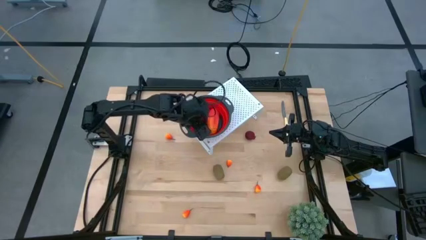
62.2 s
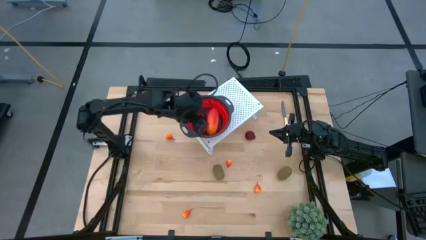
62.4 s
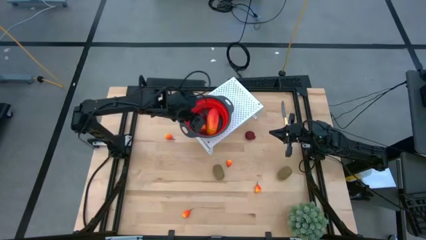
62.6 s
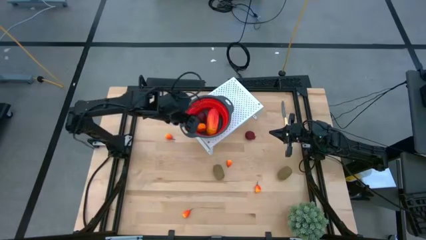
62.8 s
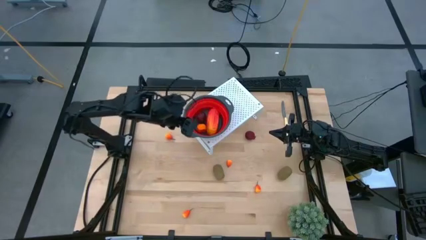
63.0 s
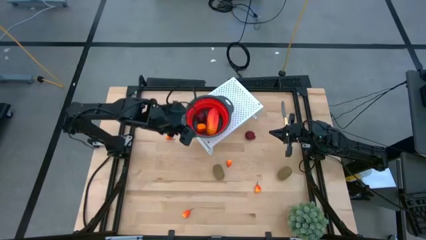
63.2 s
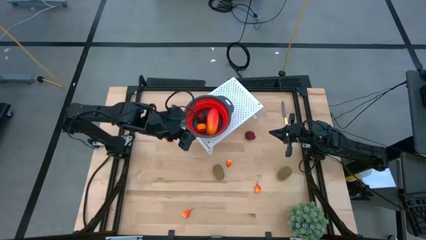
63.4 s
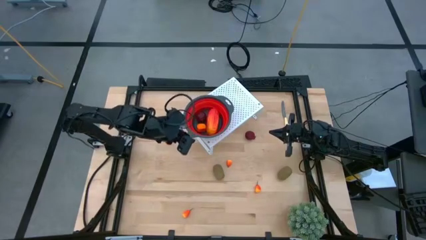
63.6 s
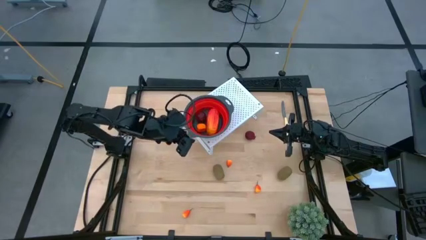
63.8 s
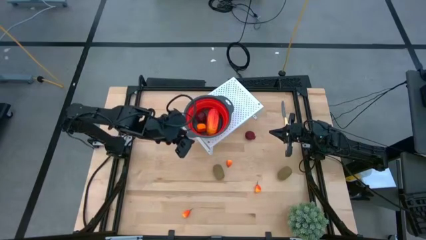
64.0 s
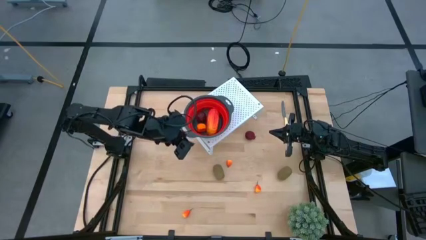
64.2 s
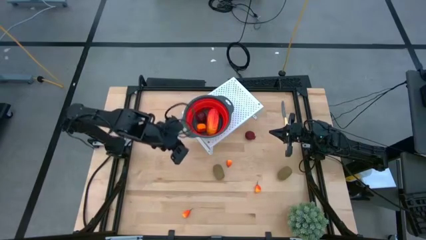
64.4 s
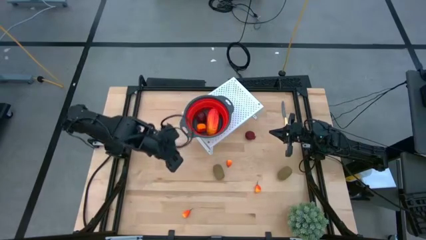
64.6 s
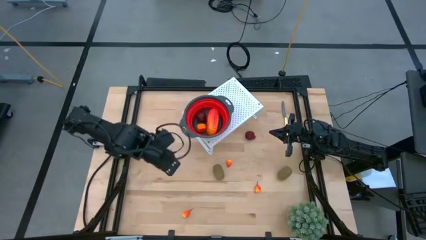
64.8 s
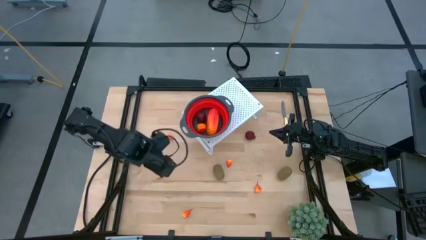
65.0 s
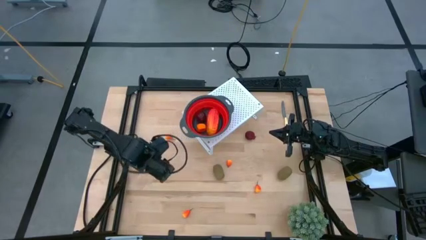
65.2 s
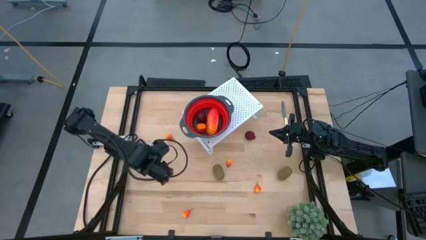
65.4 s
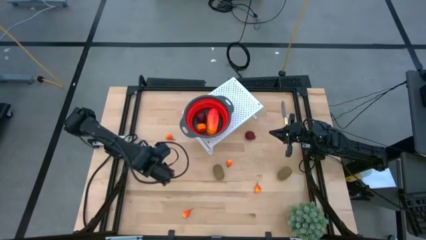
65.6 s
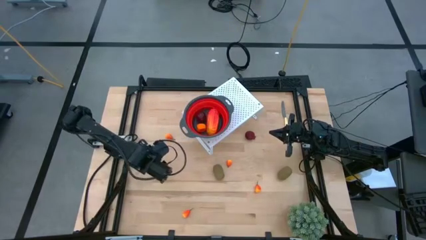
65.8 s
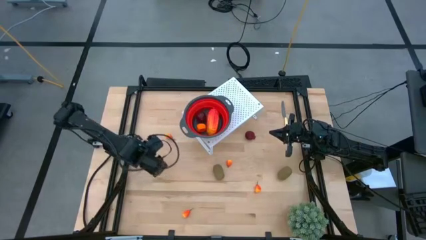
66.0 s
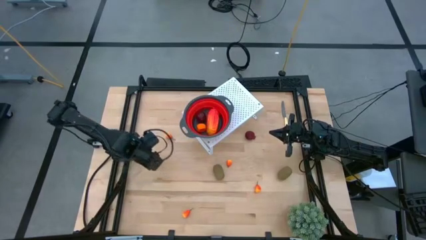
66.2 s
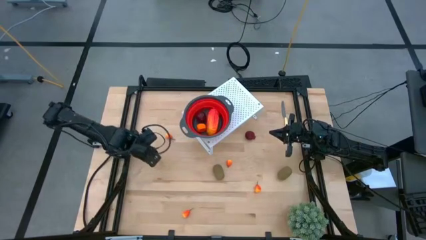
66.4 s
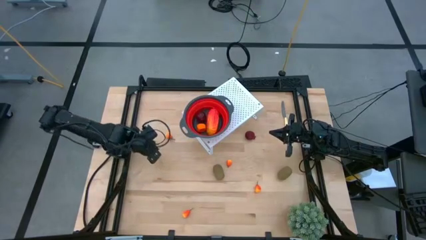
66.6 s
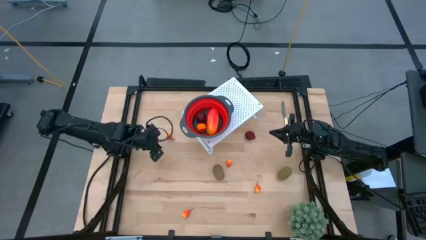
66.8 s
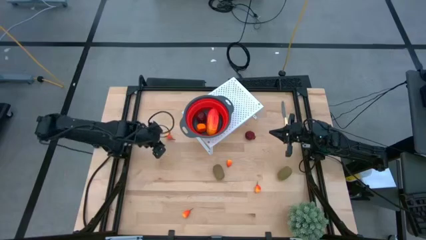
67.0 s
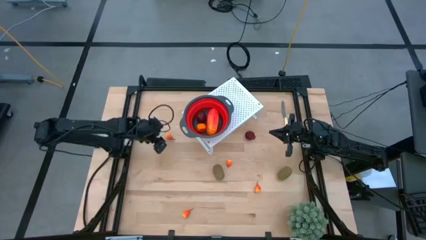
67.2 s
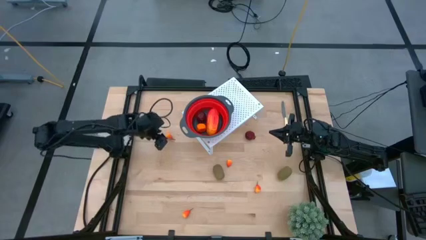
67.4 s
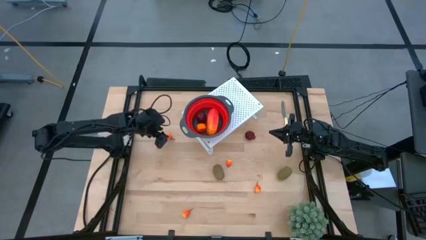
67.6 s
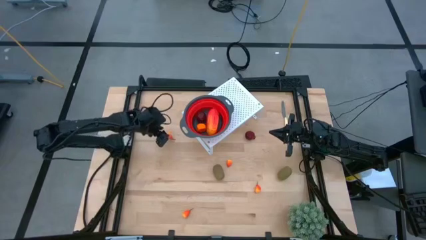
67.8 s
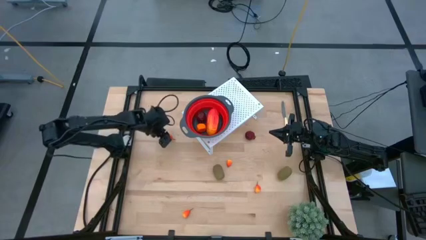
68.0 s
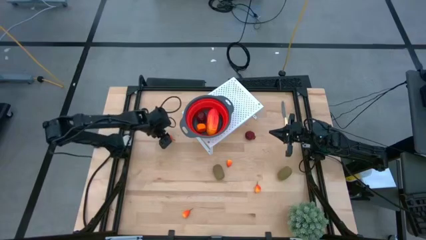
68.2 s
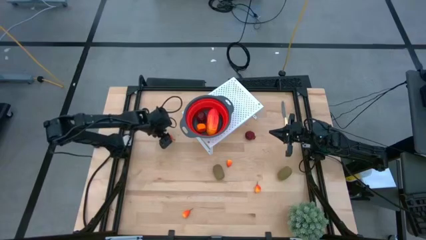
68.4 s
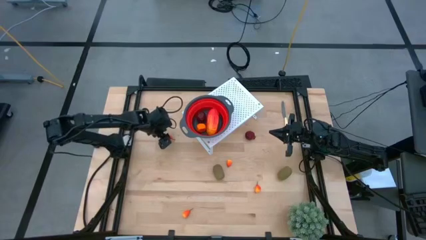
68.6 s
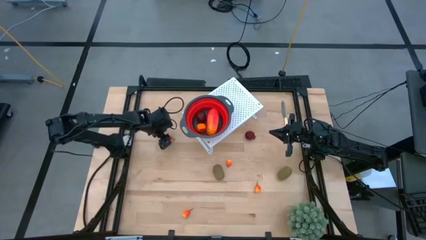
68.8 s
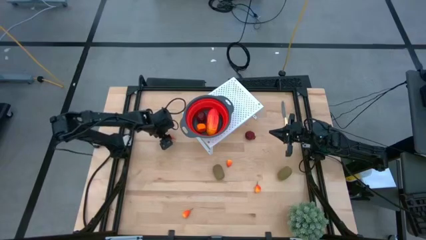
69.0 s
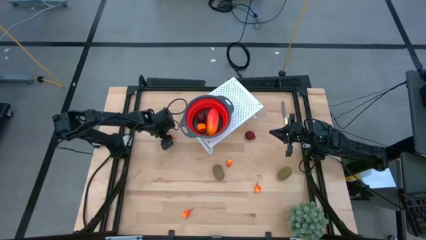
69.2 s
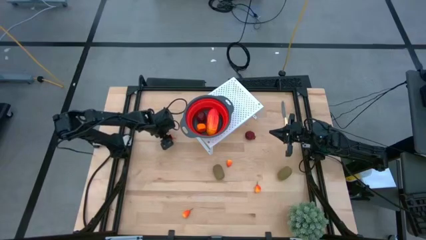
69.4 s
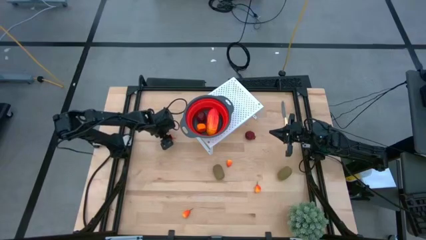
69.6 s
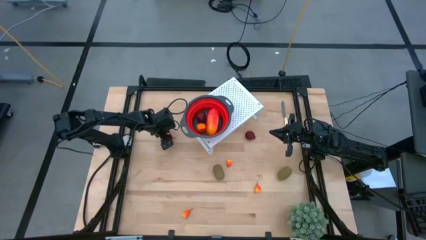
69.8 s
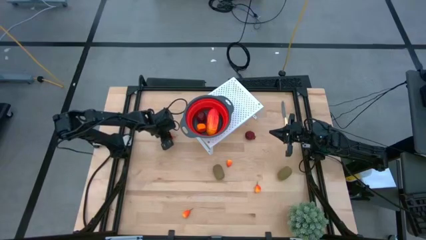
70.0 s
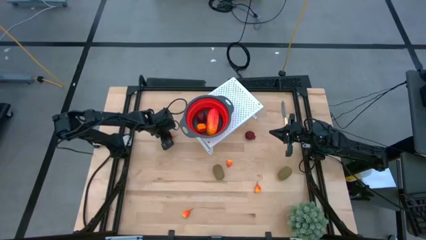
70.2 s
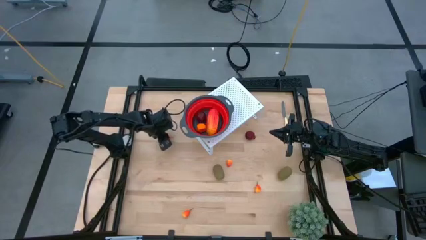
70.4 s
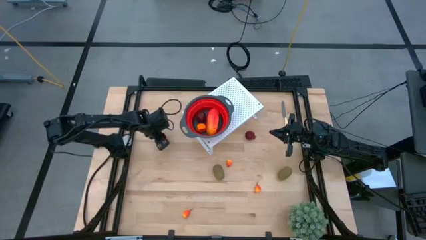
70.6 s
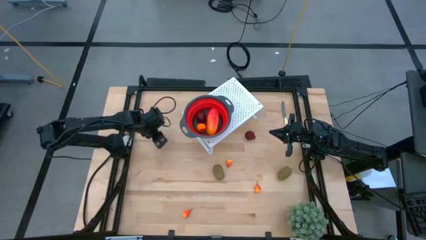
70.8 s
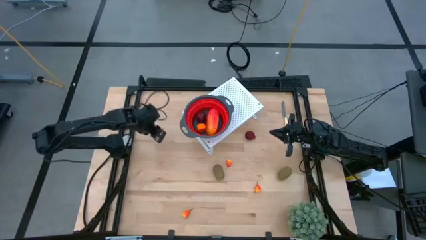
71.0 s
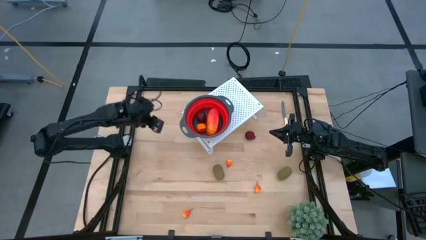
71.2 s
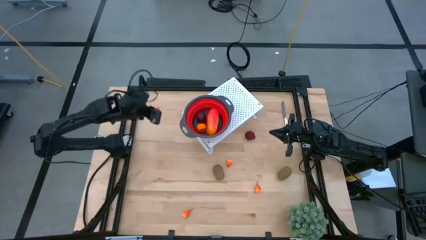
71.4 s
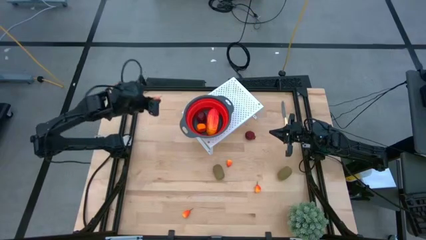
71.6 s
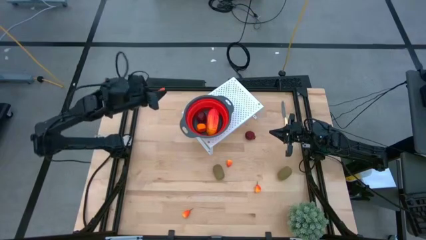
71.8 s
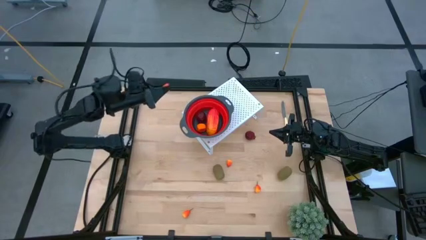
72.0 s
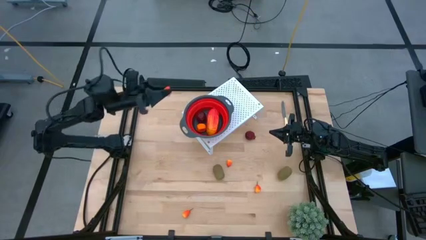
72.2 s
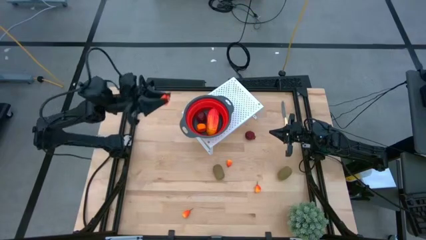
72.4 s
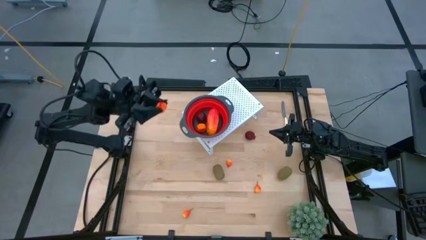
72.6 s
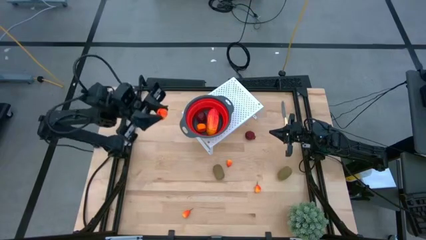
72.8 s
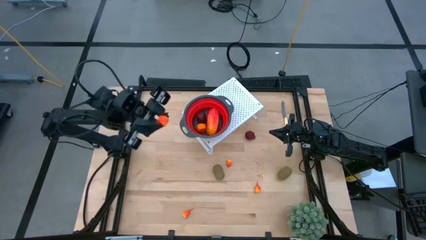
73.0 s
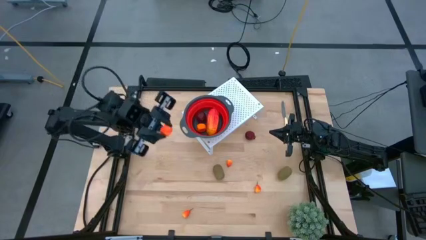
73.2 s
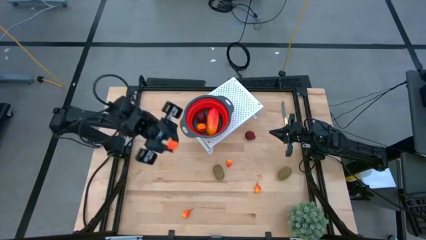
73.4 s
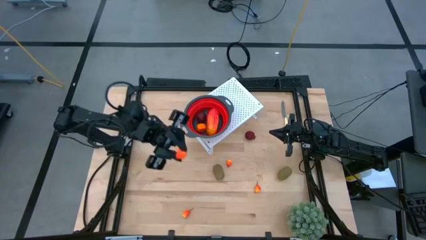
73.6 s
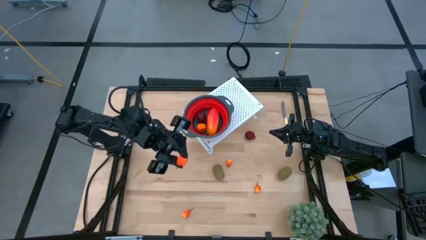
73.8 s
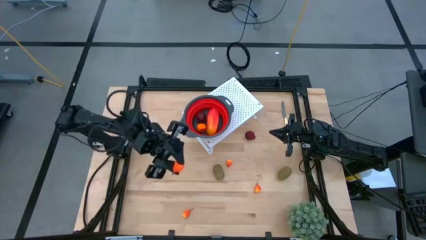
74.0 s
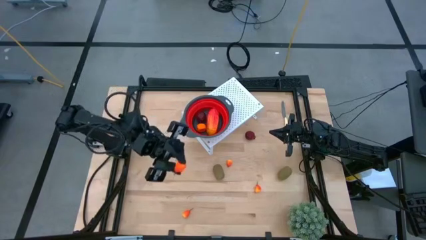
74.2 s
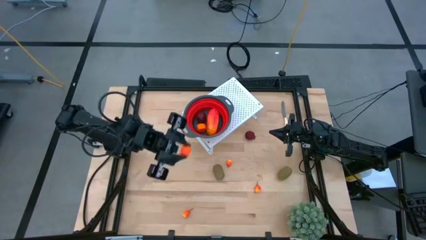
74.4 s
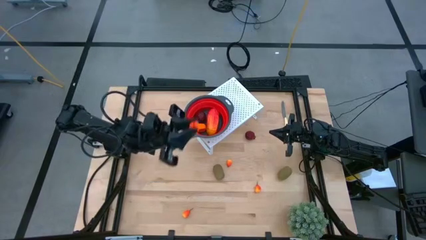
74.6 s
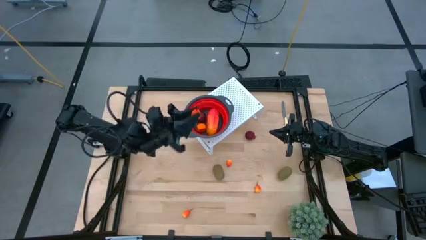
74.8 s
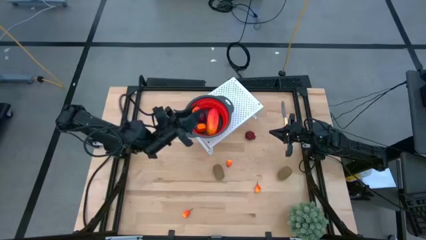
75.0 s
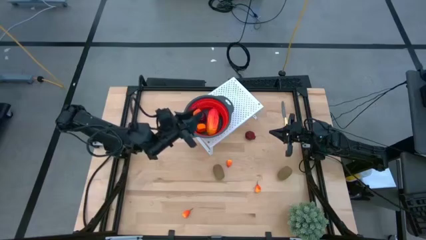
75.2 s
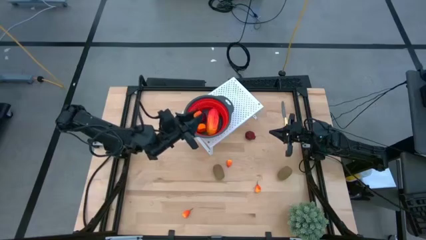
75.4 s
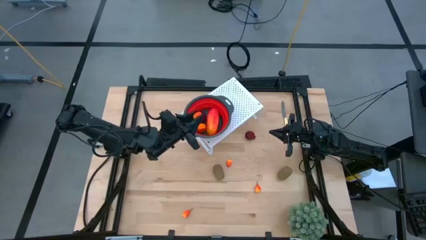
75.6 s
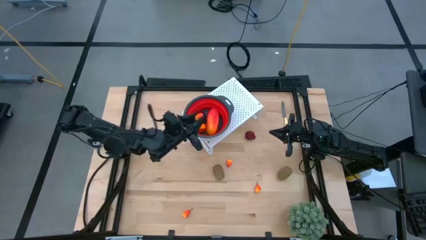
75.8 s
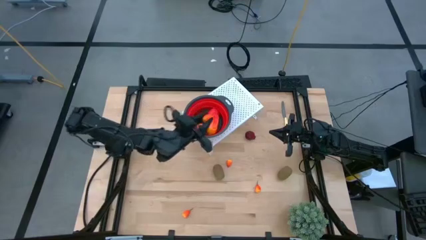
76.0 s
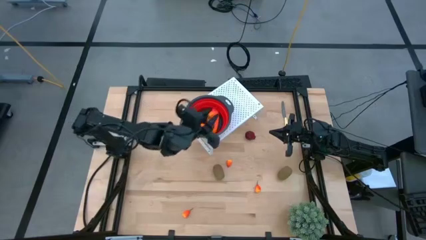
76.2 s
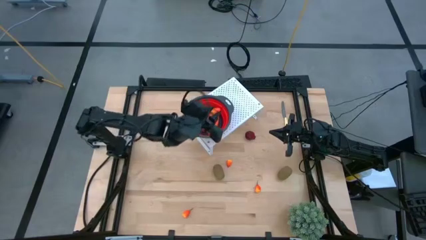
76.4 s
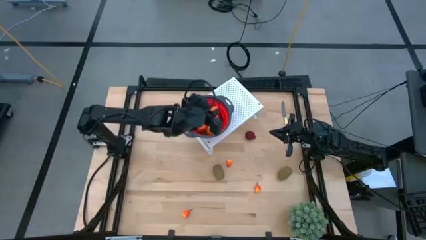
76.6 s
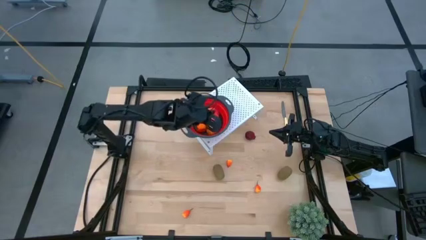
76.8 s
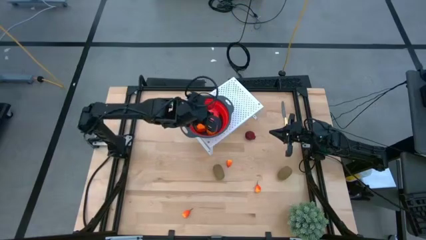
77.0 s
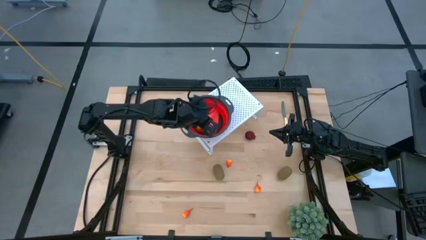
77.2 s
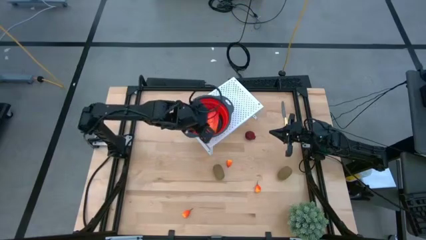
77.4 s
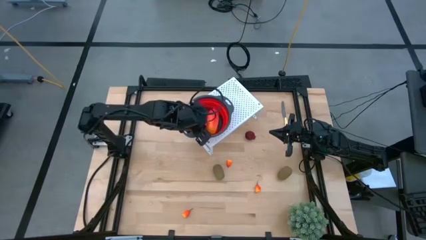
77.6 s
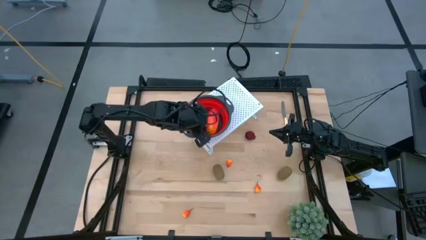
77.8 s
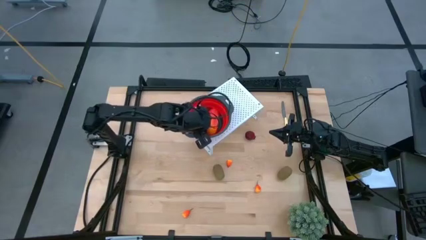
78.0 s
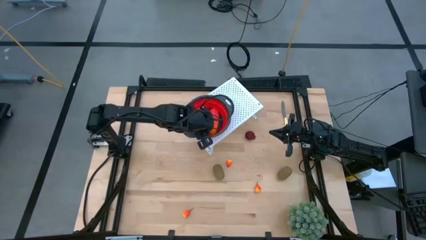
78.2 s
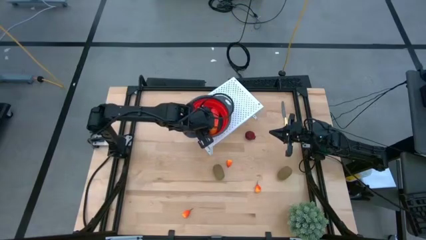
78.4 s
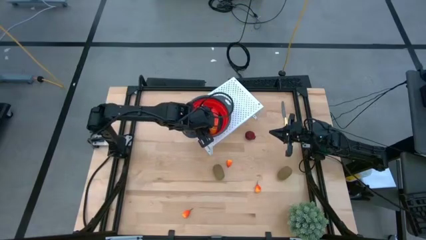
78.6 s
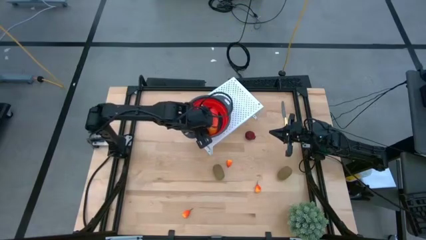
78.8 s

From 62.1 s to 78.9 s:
Task: Pick & Place Fruit
Put the pear into the red strainer bowl on the shelf
